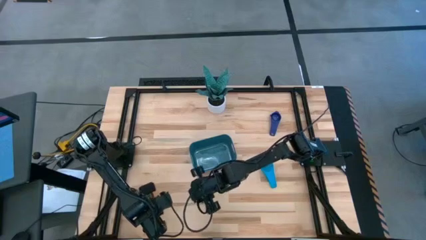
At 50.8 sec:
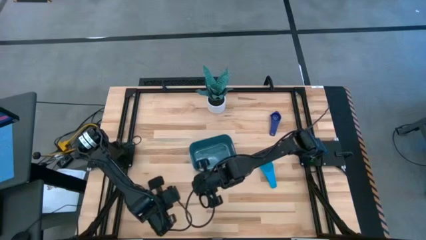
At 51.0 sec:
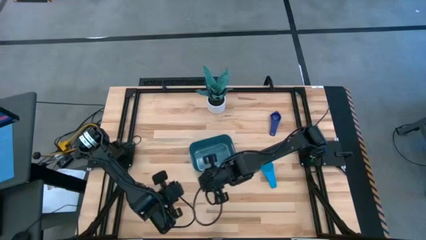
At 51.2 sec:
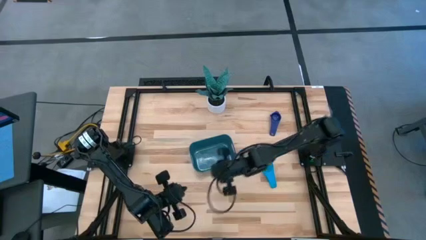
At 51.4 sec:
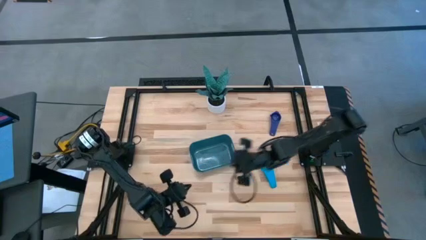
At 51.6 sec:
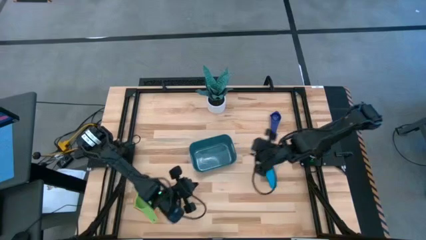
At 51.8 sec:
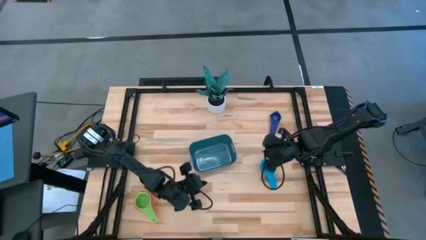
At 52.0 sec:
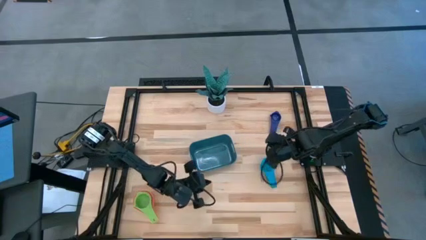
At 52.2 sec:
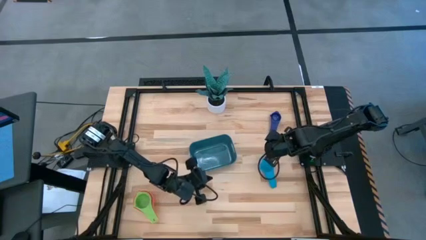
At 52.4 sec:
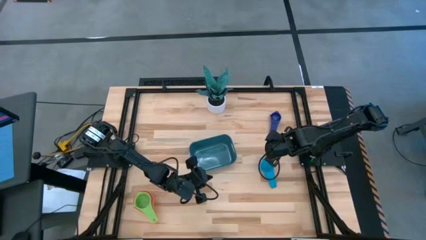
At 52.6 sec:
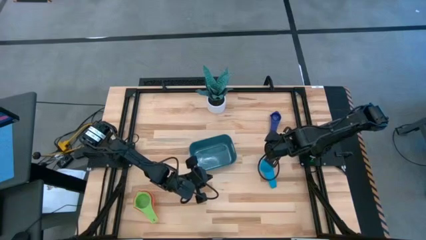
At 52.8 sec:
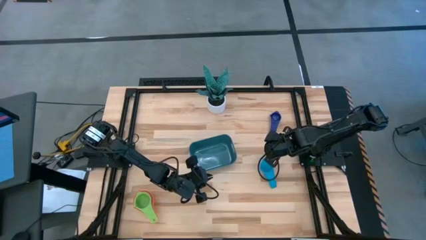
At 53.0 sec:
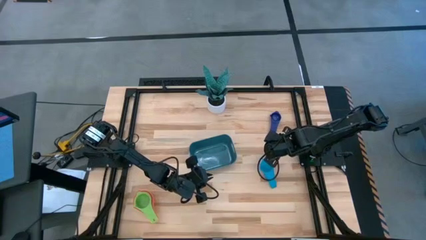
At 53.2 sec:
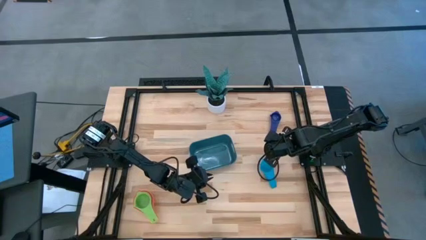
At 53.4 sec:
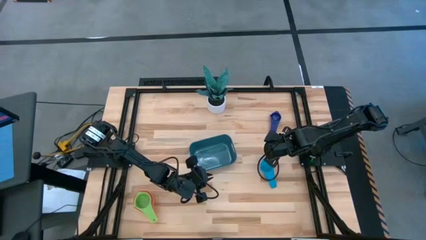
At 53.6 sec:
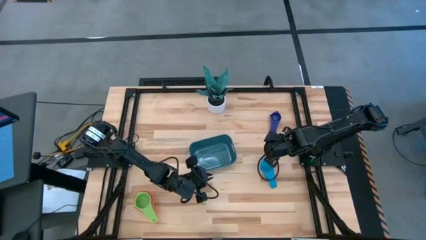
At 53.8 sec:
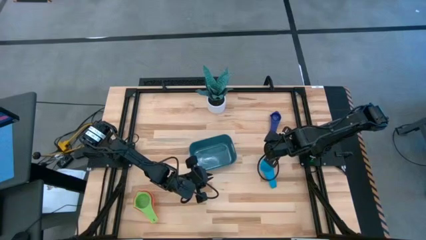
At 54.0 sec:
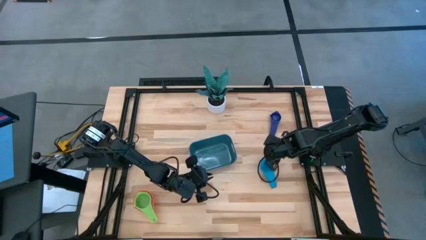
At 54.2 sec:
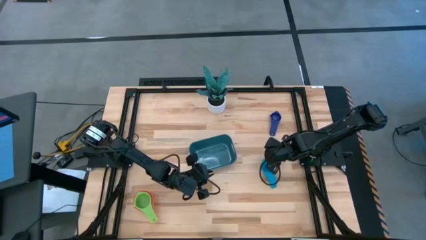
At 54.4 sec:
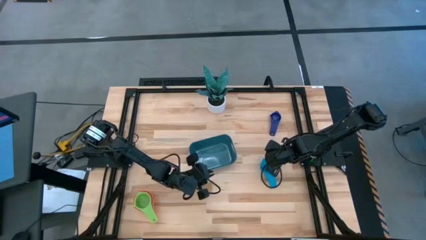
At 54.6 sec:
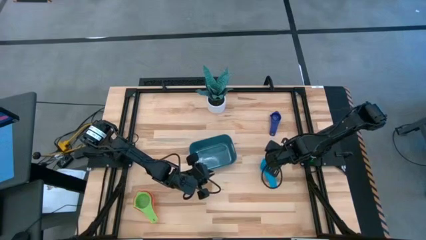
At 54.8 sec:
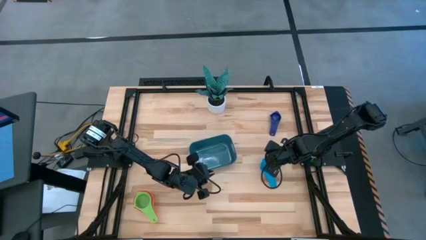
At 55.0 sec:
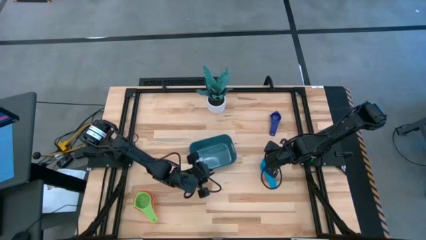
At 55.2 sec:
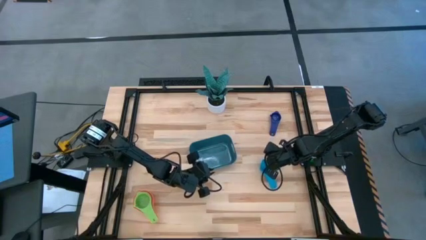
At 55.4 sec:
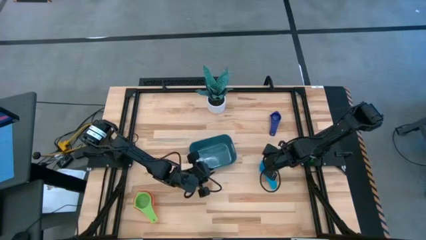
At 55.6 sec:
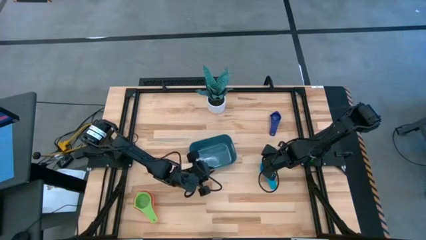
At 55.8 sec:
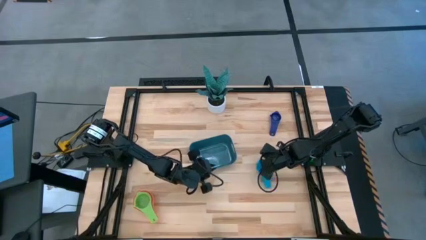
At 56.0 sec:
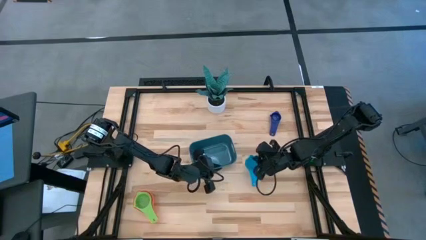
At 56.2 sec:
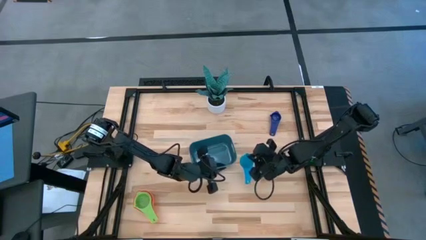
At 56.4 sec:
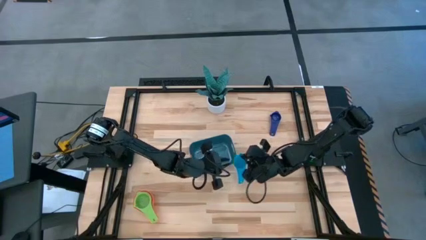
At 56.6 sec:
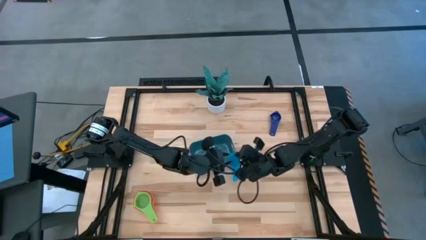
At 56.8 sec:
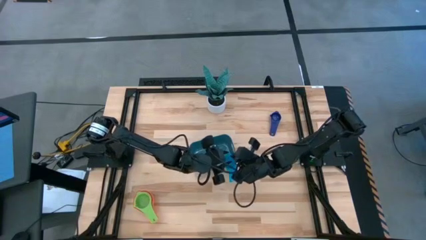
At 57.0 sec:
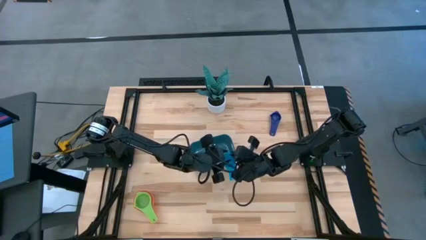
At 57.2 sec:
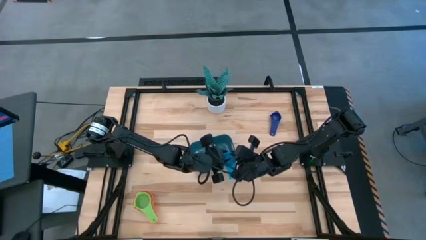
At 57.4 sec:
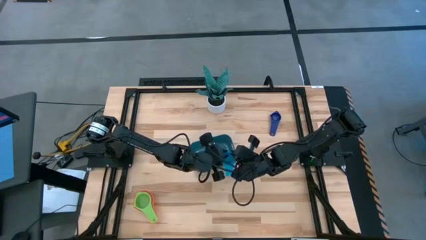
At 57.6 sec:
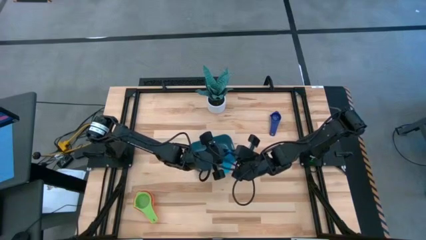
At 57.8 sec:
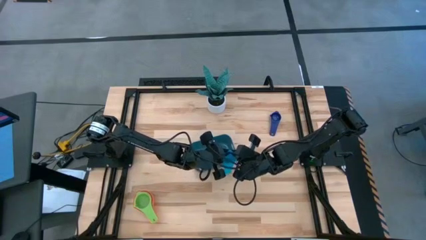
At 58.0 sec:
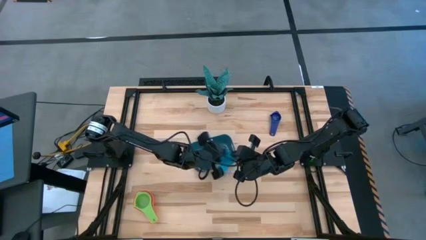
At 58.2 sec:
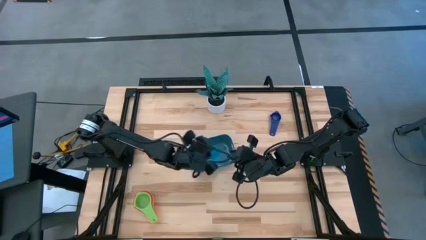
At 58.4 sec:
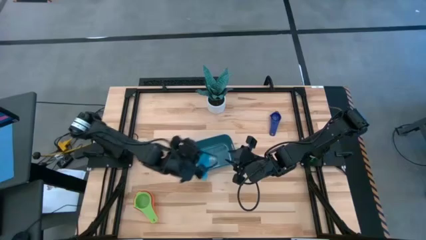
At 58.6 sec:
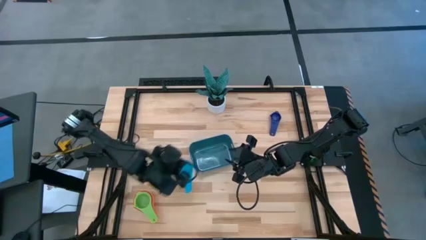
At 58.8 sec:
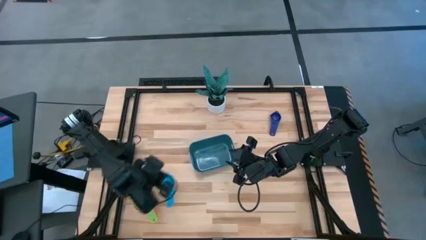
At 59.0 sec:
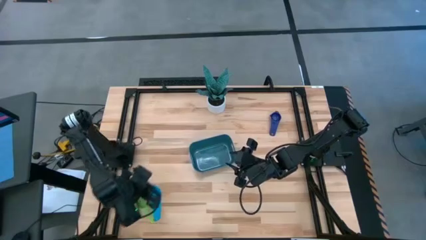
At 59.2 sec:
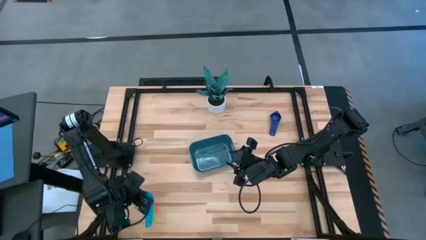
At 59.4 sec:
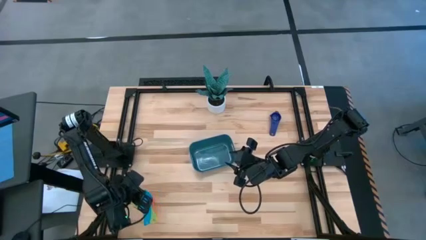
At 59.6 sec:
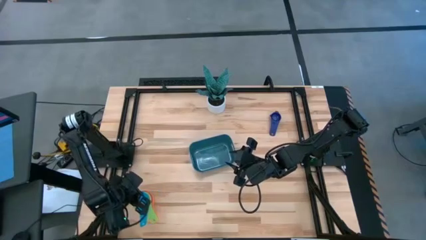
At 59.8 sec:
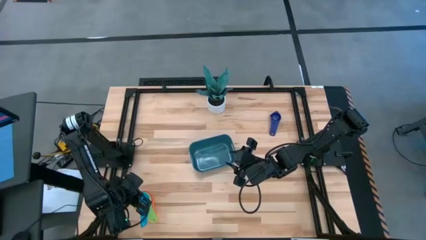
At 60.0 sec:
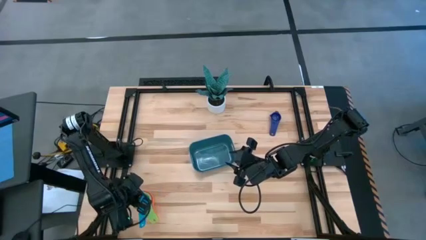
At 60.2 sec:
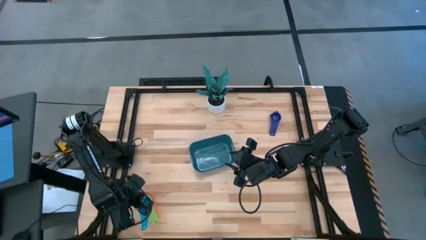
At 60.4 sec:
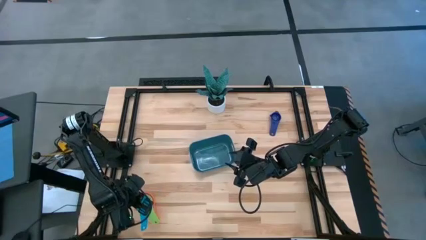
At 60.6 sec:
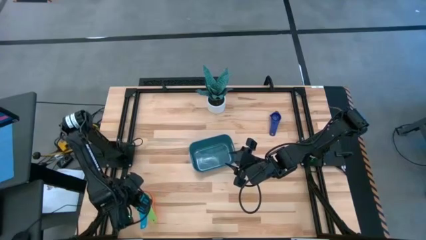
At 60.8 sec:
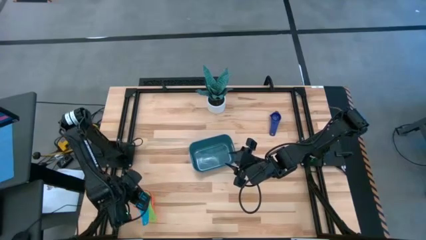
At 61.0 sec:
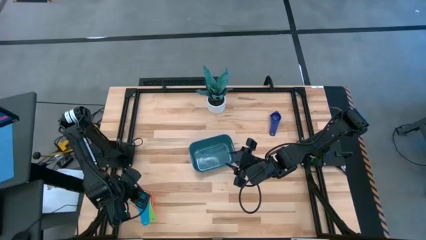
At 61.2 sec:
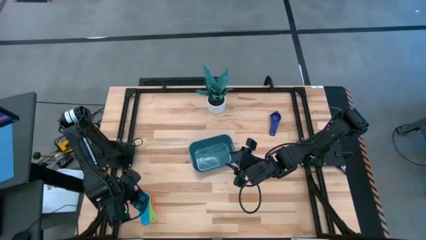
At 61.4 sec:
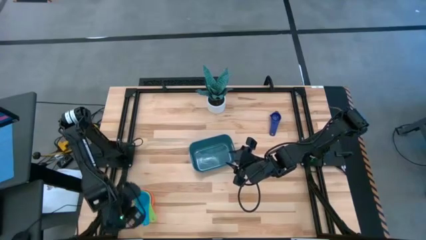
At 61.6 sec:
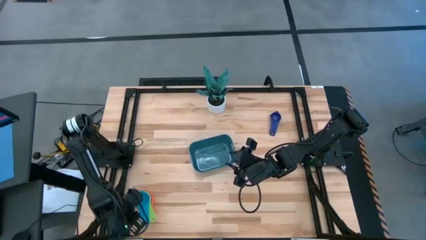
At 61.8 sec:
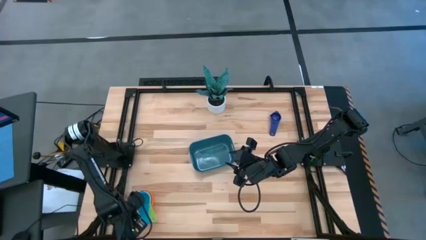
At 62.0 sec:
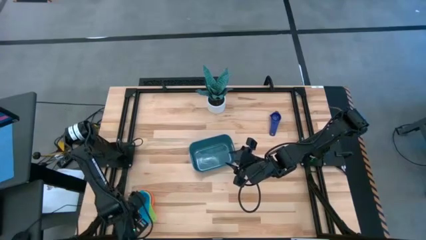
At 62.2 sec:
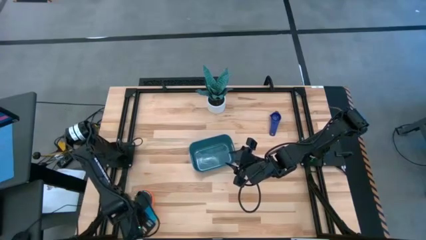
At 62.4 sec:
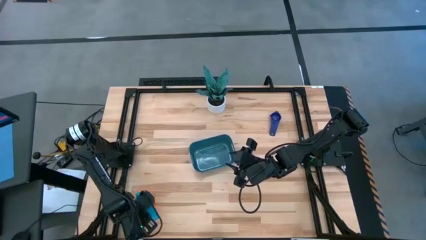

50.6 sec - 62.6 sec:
Task: Nest measuring cups in basket
Stack the light blue measuring cup on top of the green measuring cup

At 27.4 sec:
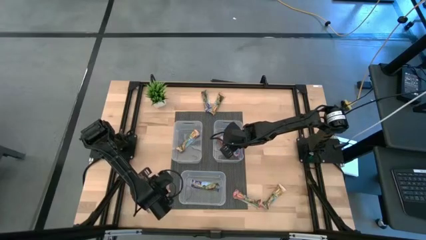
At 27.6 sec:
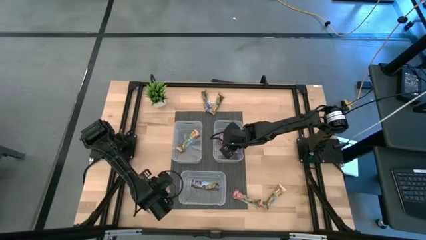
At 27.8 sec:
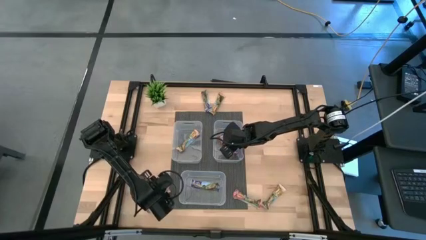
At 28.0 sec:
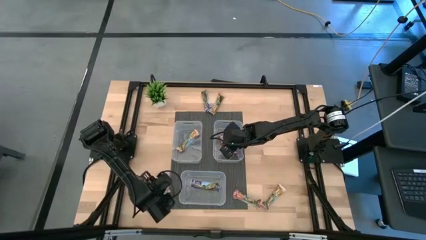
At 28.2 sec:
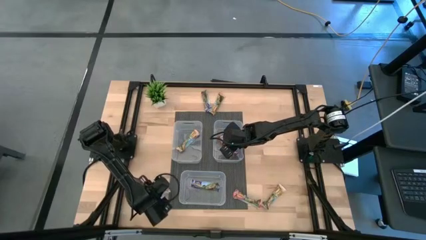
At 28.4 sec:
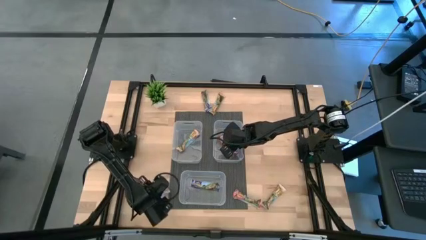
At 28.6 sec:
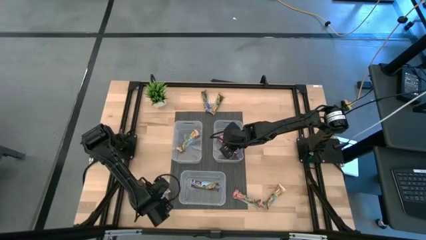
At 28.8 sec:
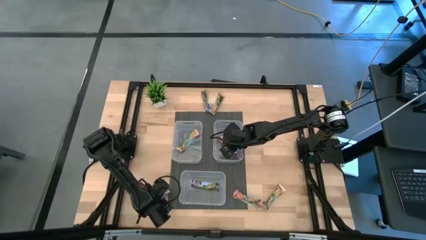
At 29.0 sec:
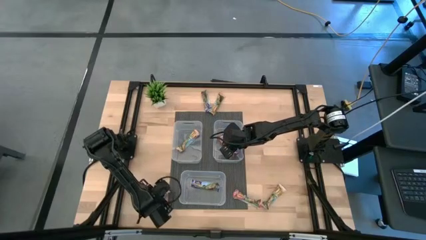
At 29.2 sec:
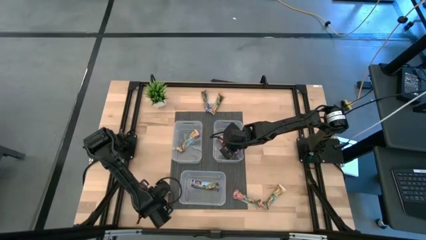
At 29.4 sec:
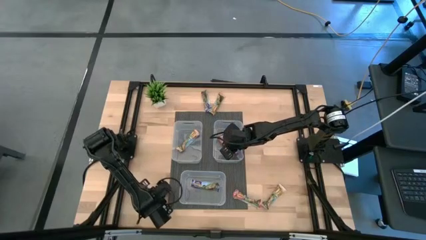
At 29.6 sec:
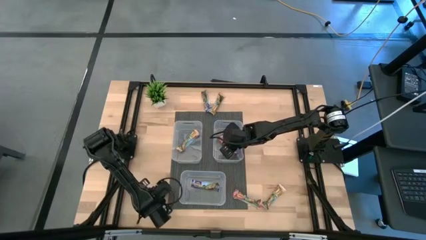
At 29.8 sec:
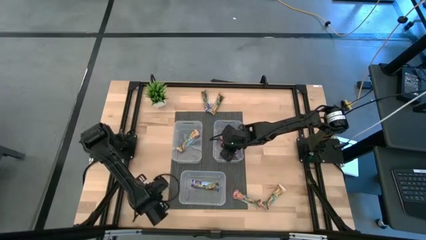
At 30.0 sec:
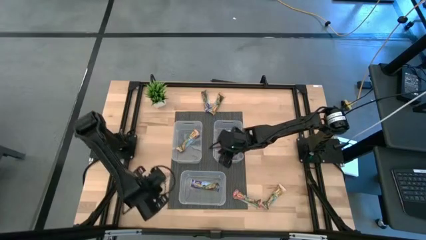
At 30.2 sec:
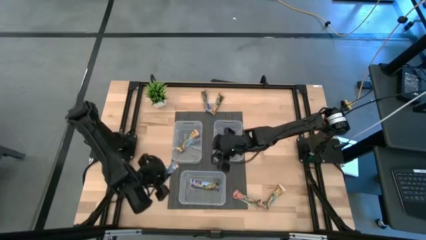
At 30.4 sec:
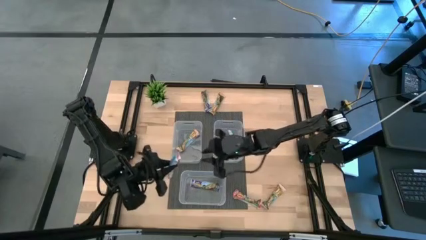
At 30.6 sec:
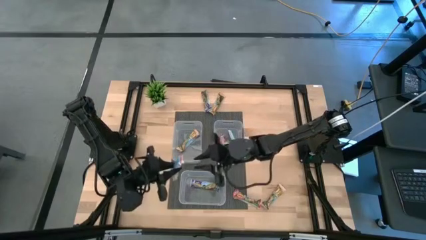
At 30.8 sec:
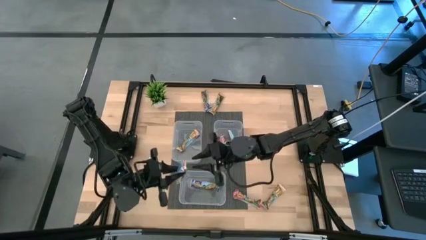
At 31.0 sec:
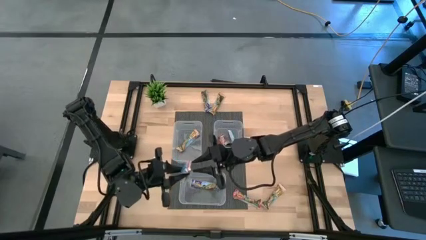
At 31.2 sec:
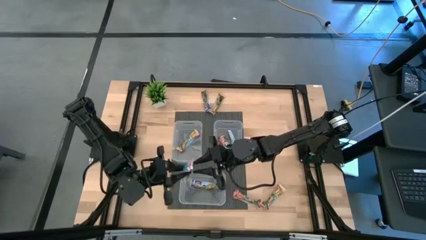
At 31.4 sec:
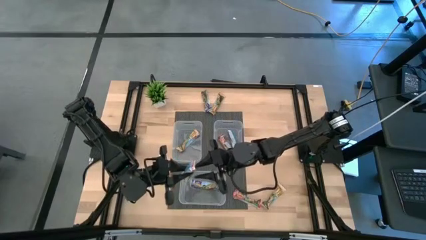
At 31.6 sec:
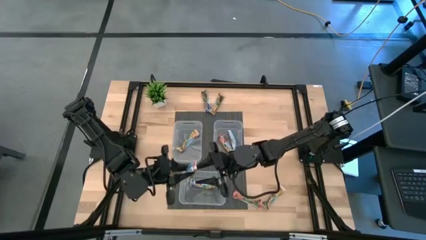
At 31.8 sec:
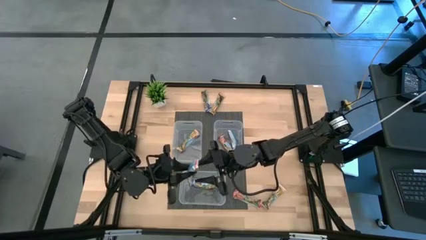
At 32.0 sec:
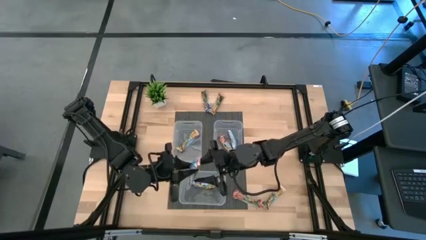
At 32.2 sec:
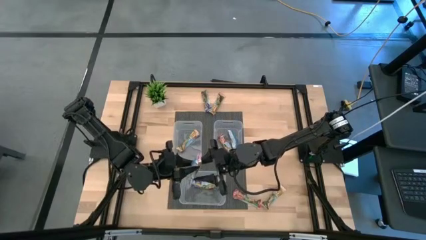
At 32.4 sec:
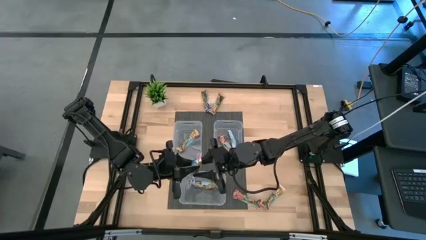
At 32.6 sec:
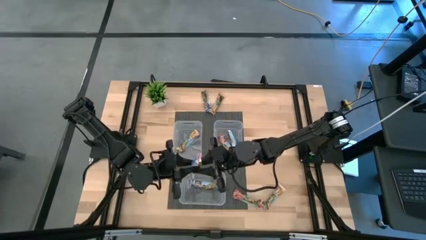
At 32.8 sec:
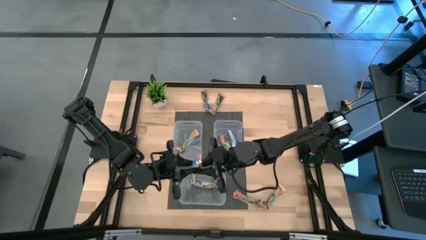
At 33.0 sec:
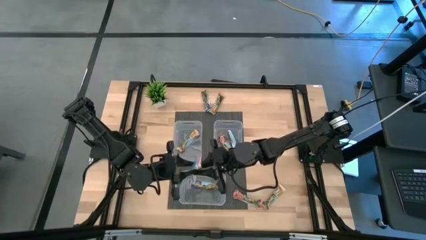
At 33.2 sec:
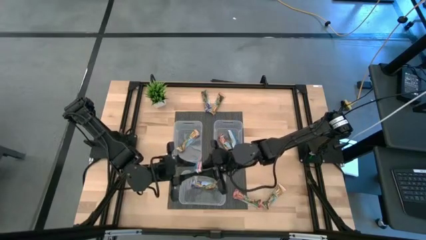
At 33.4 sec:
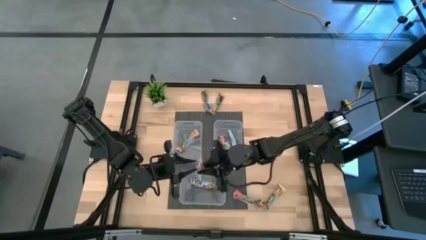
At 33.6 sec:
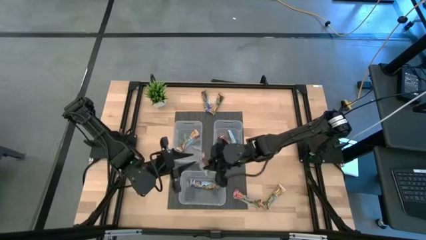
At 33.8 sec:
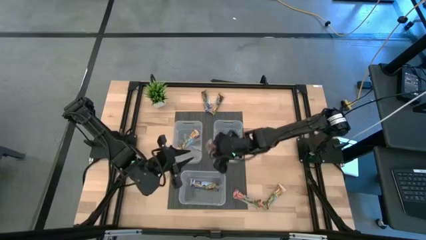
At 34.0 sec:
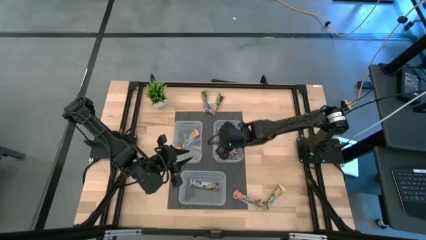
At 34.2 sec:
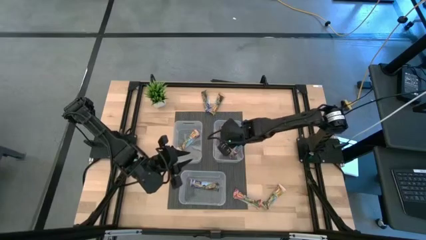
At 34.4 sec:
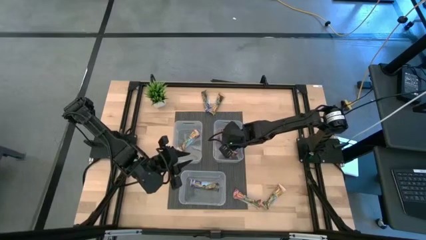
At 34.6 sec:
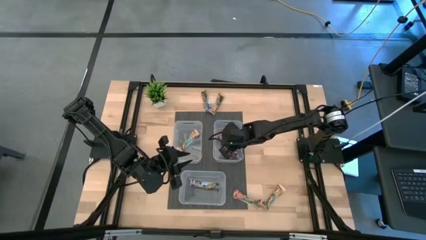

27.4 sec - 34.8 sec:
Task: Pick and place Granola Bars by type
Put the left red granola bar into the top right transparent bin
